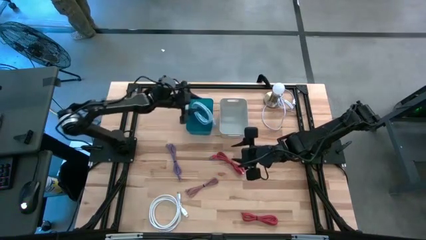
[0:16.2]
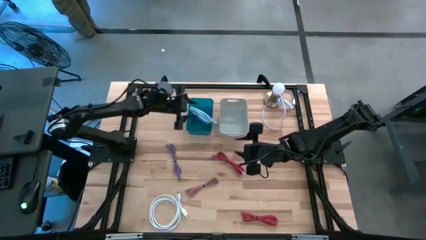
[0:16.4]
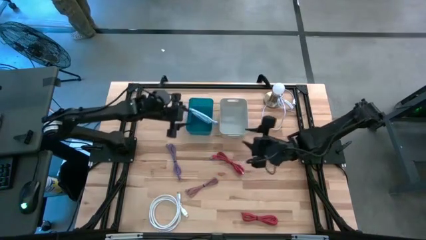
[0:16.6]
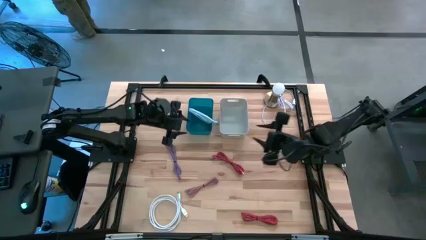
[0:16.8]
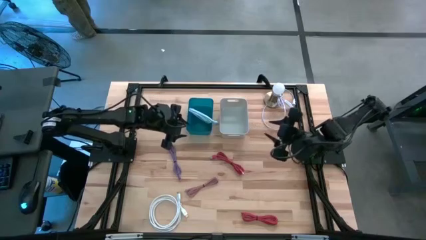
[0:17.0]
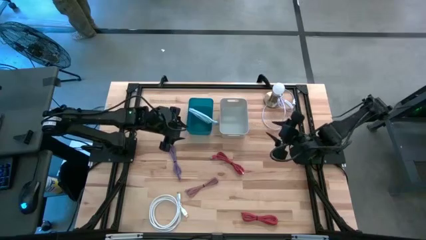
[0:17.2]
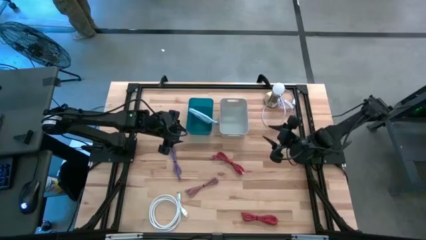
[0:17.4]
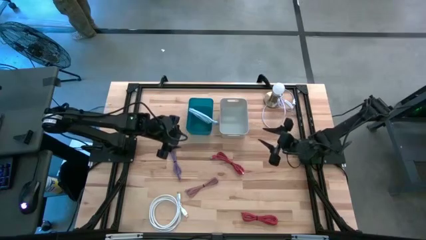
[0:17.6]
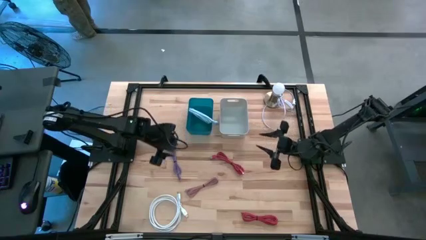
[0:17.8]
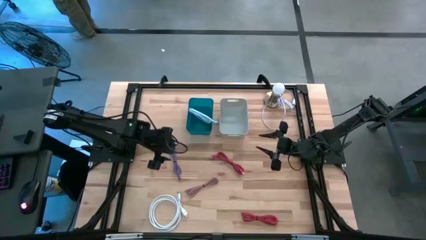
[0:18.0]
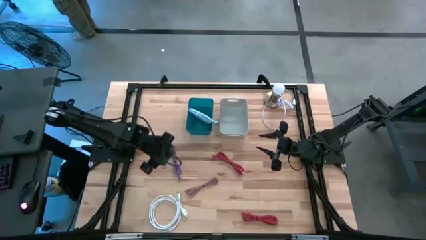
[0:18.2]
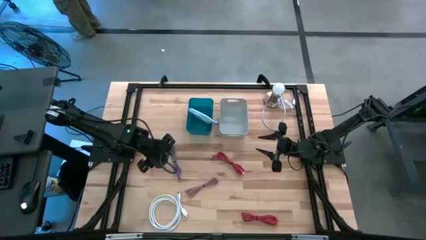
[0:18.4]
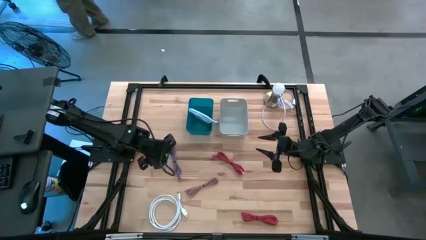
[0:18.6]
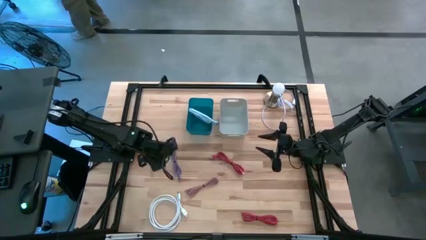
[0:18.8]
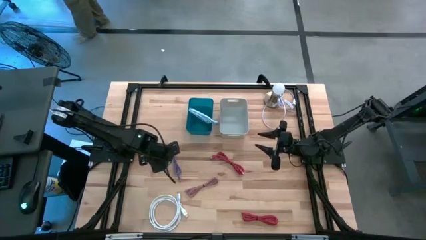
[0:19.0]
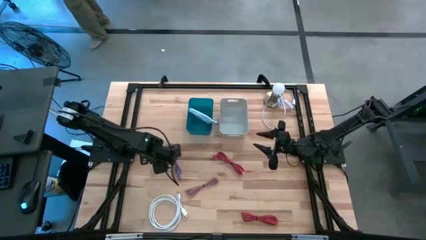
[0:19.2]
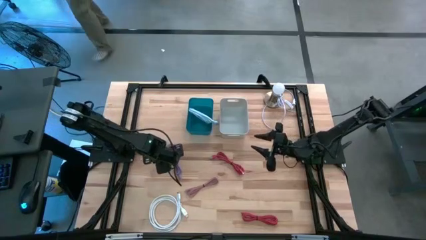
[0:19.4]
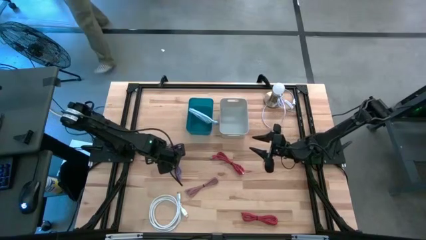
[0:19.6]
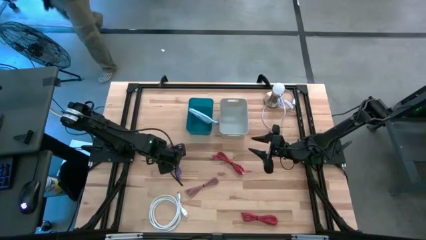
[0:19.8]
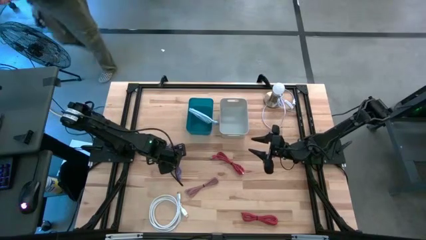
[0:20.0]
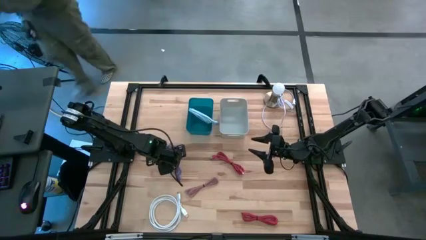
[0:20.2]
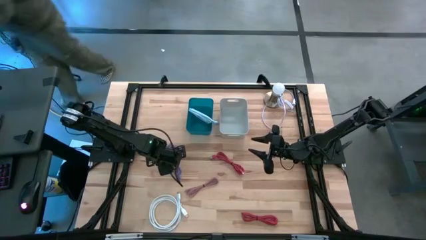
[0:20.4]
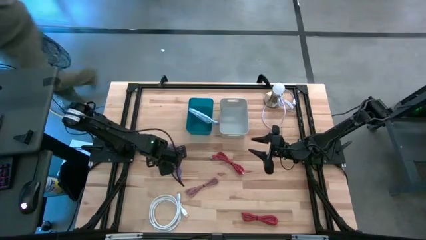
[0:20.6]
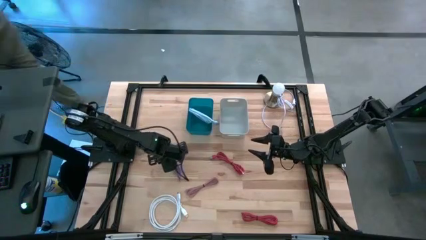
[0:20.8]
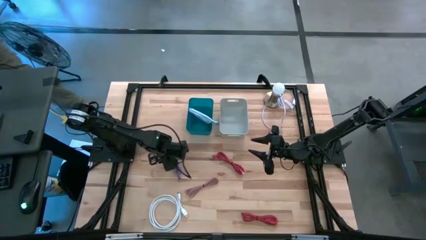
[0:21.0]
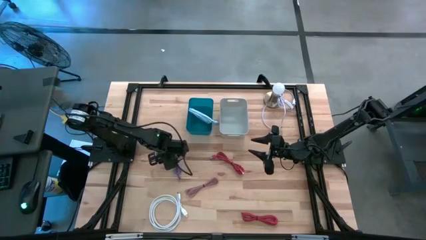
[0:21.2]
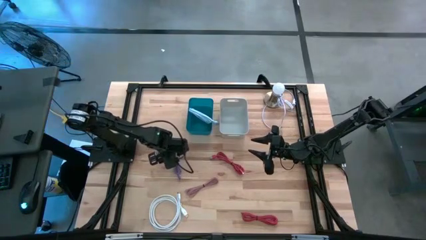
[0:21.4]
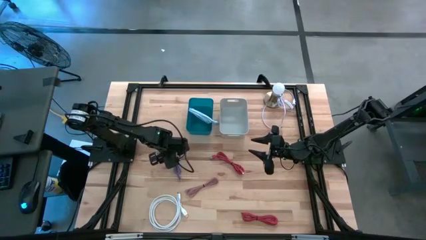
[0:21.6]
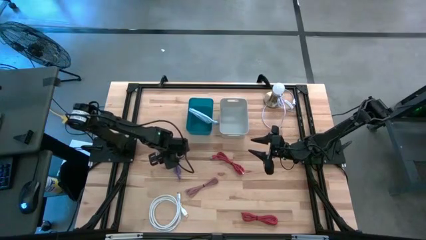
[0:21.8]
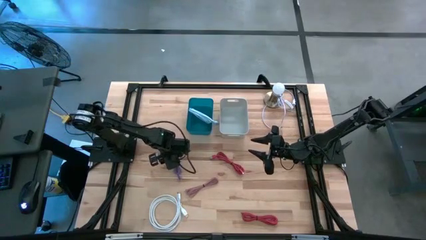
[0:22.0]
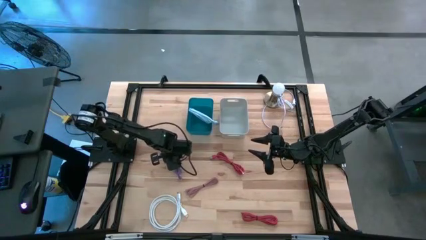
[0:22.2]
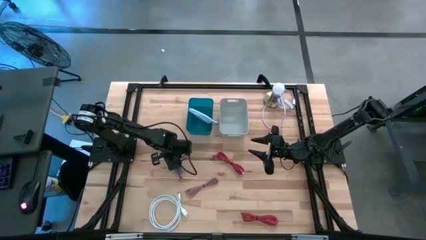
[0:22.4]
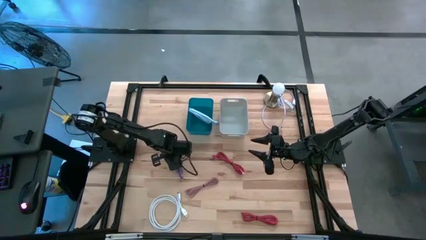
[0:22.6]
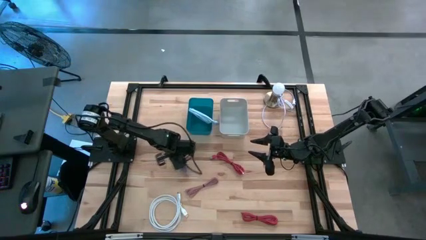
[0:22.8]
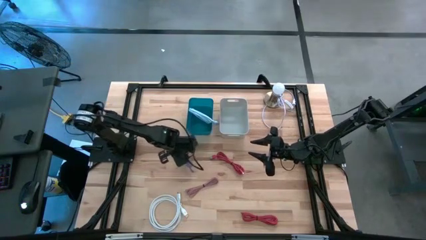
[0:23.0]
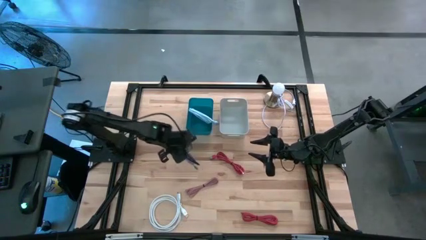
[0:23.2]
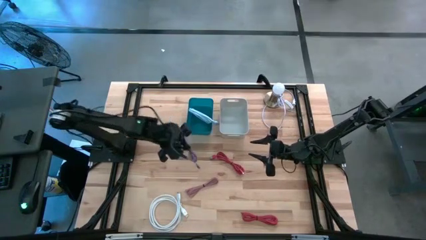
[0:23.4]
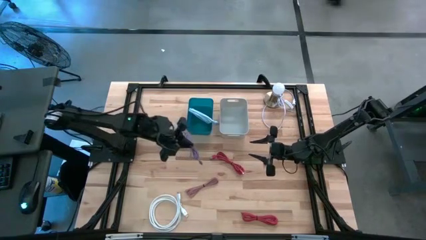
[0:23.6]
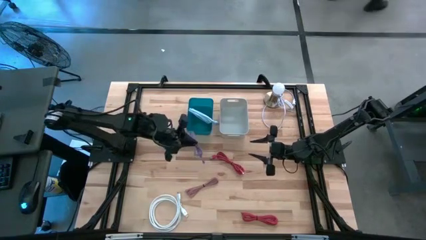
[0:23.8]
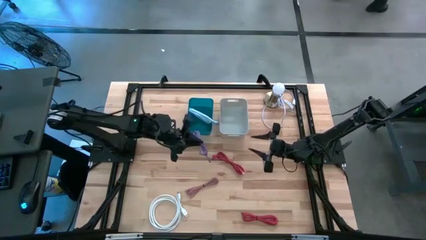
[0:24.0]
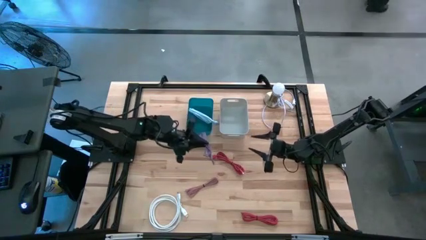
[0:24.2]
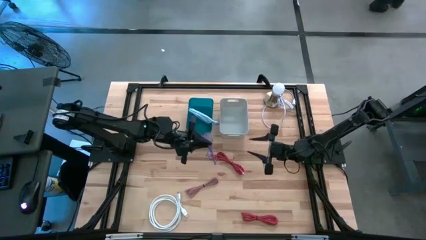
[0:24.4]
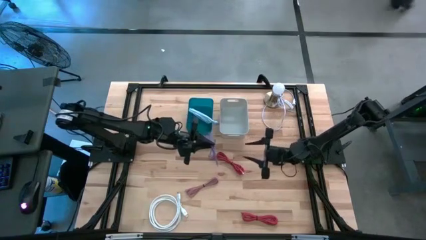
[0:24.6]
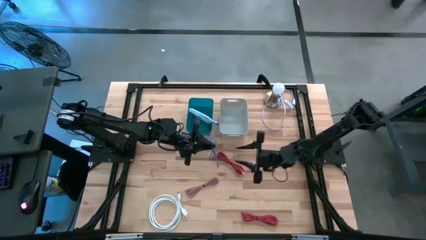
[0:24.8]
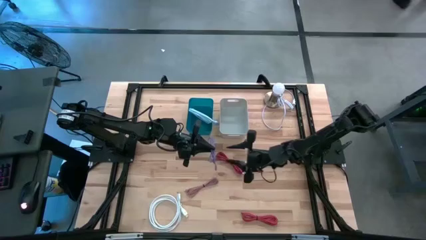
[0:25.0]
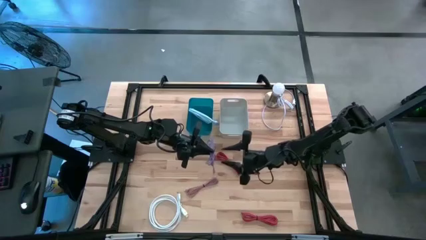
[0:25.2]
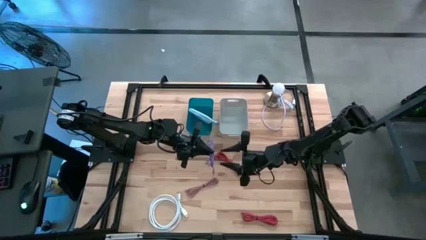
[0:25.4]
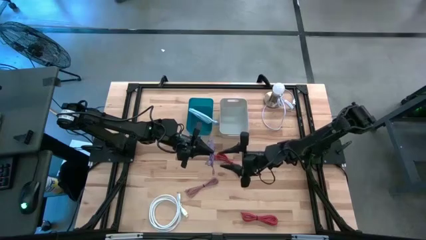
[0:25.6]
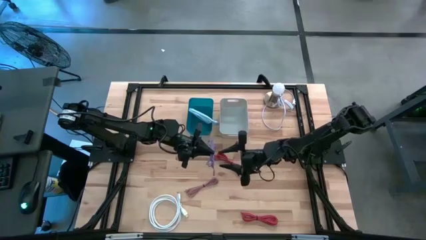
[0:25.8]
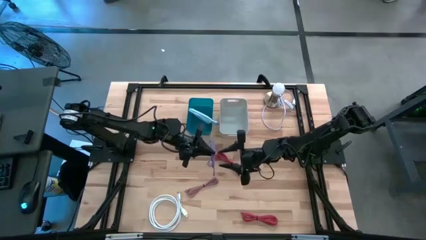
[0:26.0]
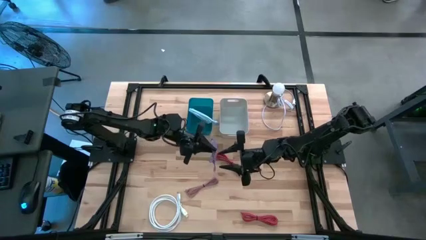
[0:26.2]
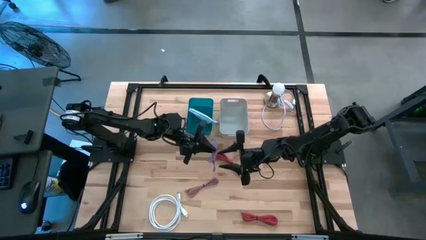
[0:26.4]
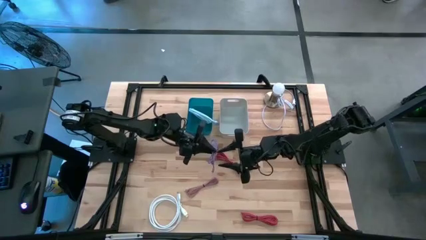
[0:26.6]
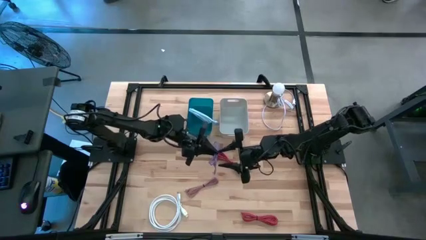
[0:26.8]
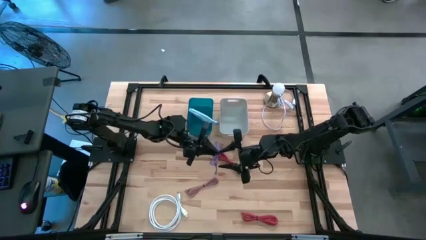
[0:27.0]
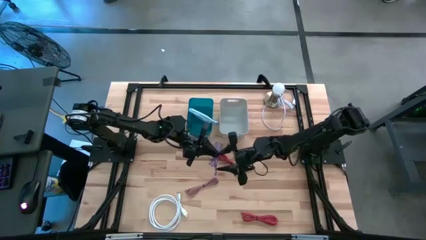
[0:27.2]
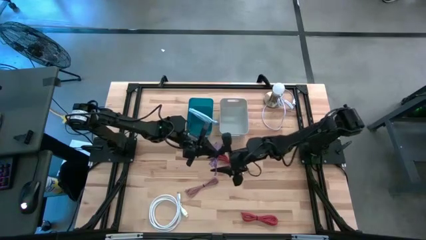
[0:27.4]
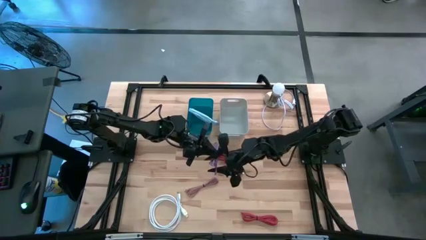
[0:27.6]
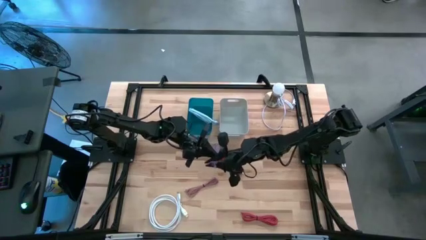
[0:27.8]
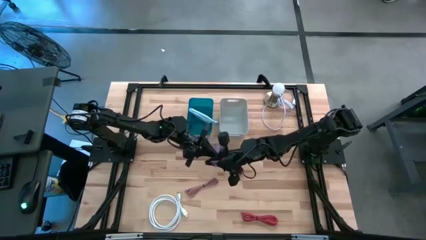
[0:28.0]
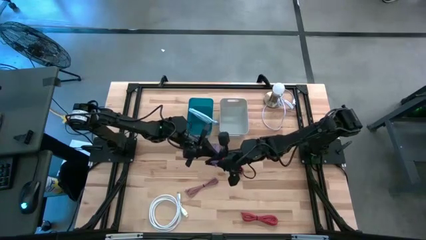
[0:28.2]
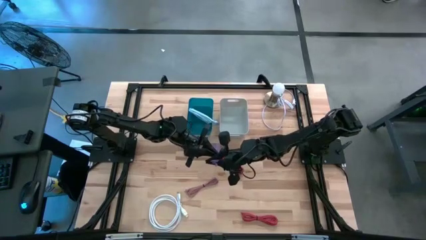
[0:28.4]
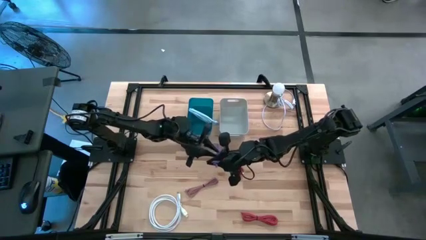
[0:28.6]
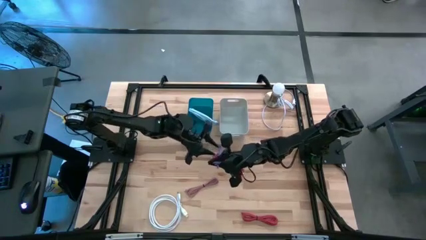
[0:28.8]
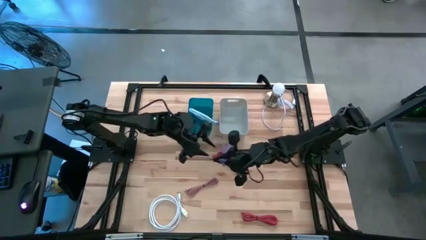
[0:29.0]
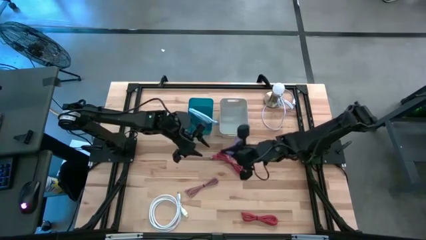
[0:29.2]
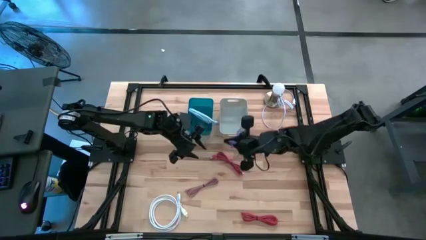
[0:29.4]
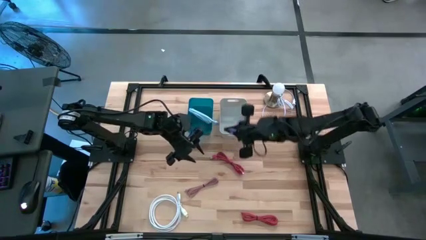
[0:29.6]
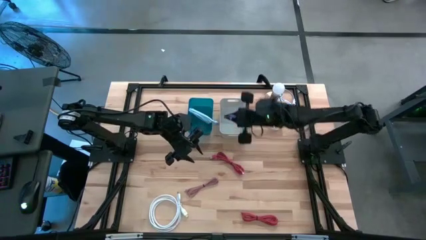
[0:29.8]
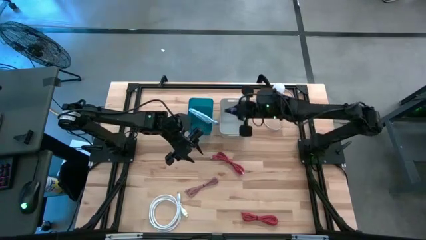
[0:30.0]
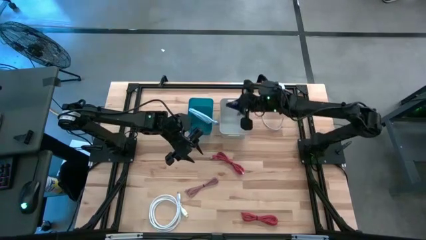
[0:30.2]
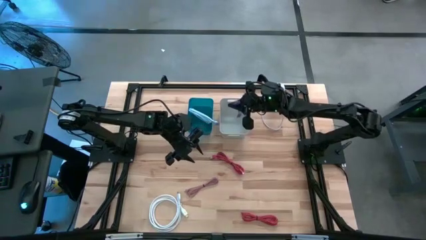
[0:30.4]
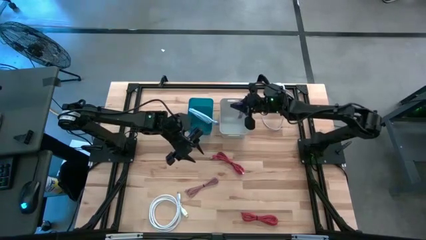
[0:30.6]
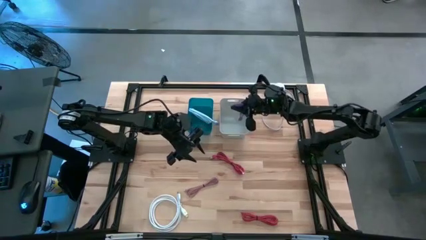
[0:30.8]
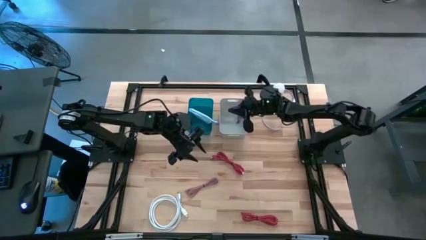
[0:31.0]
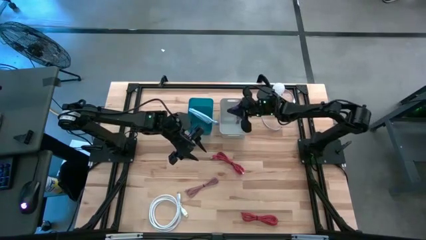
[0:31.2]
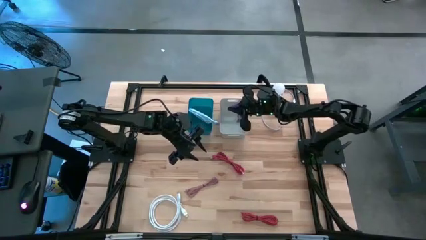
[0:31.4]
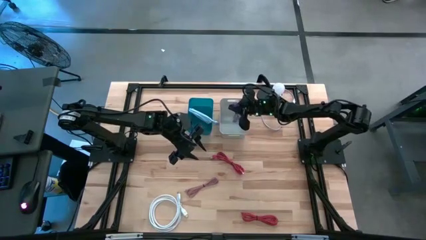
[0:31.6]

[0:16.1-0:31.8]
Task: Pick & Place USB Port
Put the purple charger cable into the gray bin
